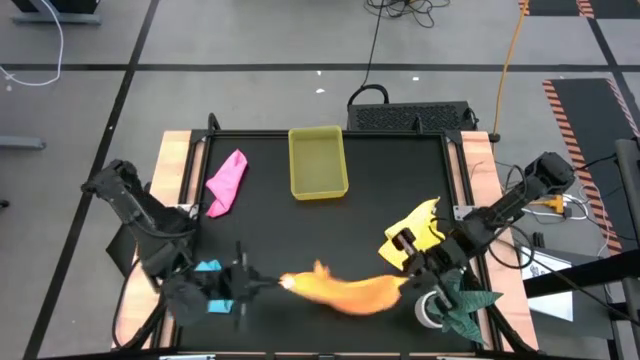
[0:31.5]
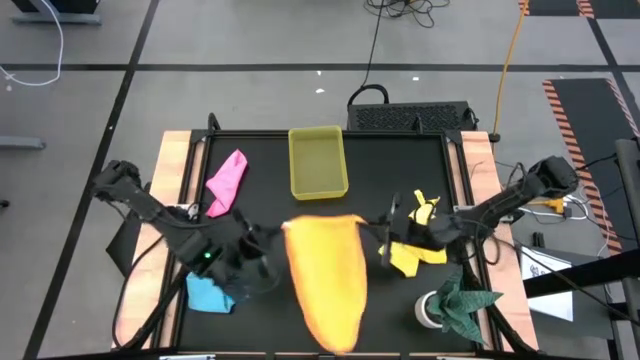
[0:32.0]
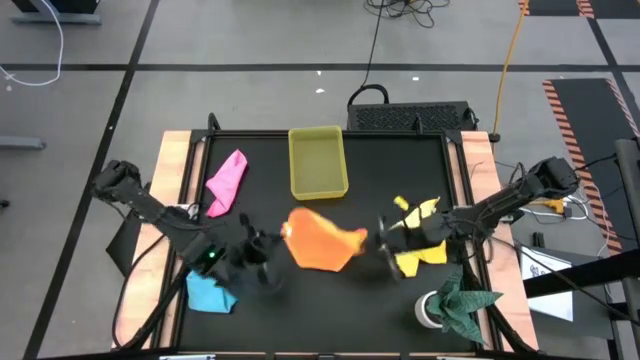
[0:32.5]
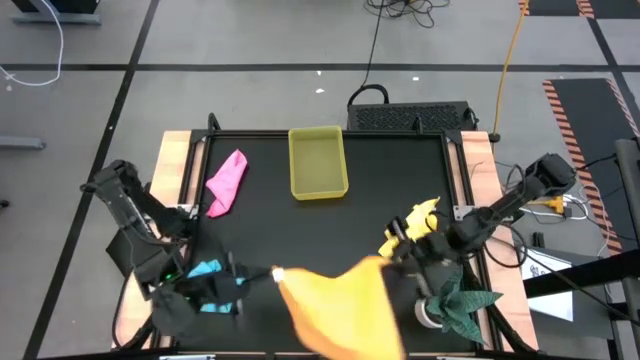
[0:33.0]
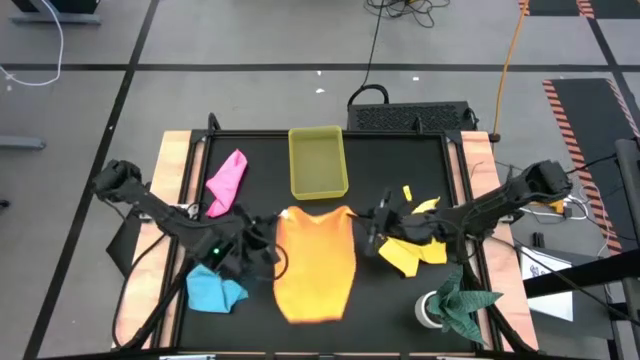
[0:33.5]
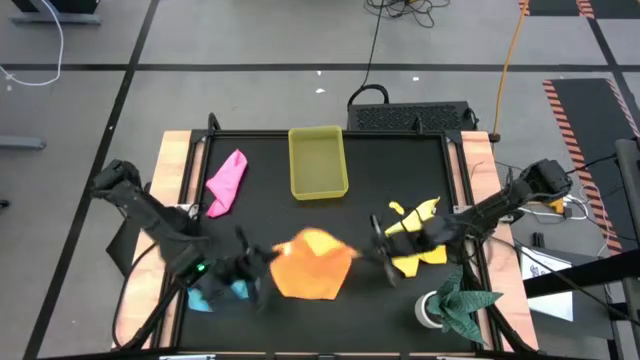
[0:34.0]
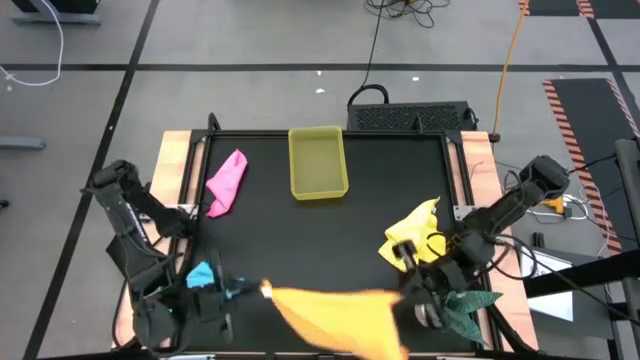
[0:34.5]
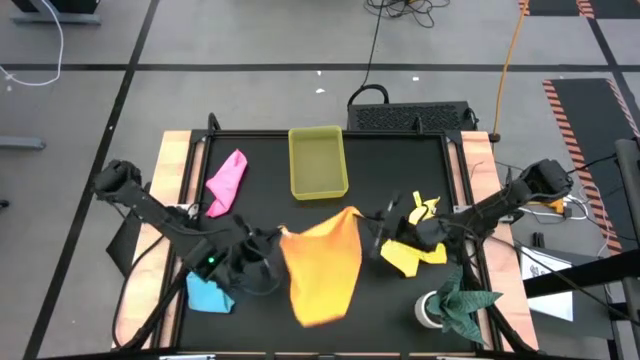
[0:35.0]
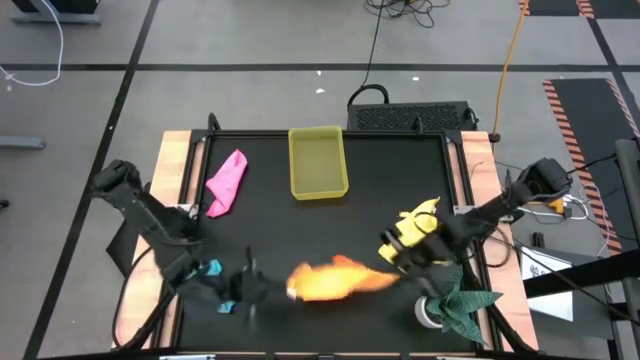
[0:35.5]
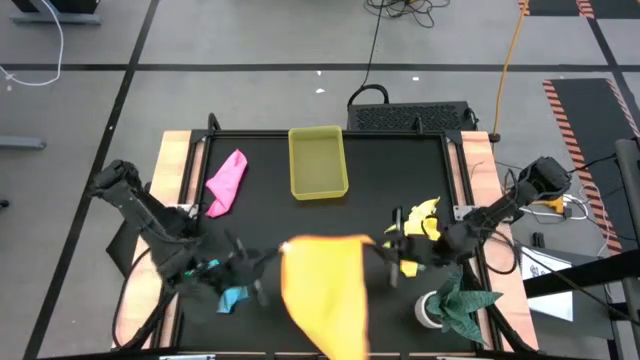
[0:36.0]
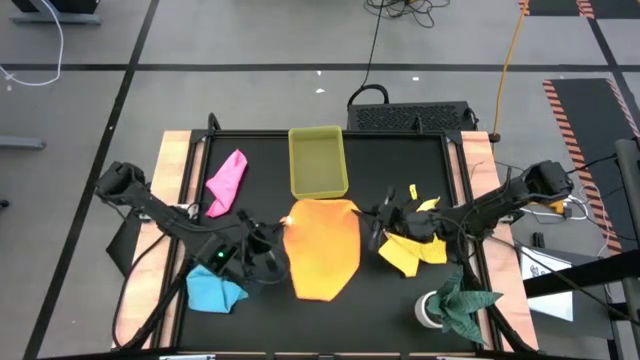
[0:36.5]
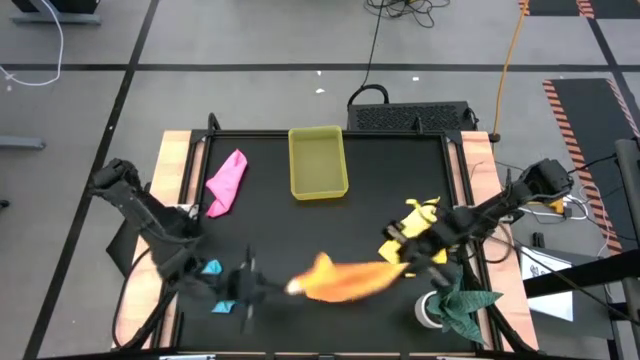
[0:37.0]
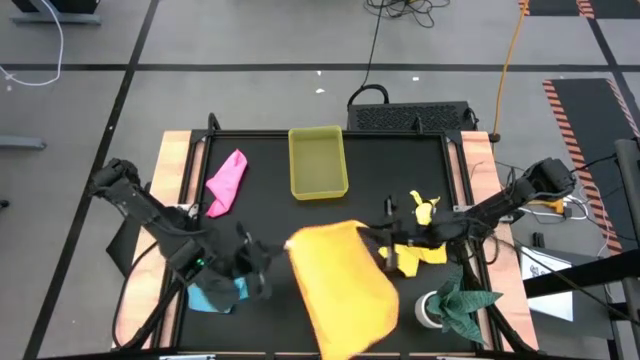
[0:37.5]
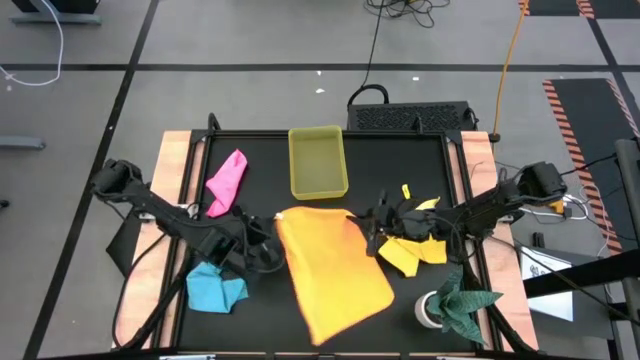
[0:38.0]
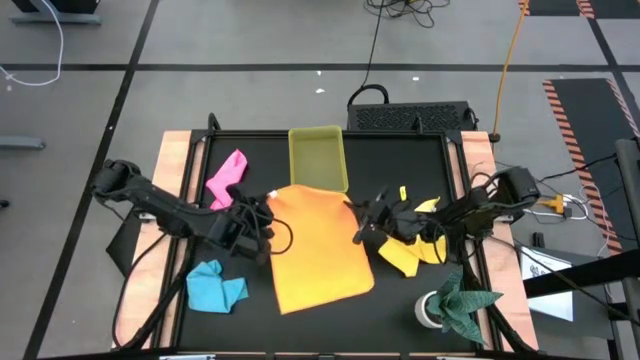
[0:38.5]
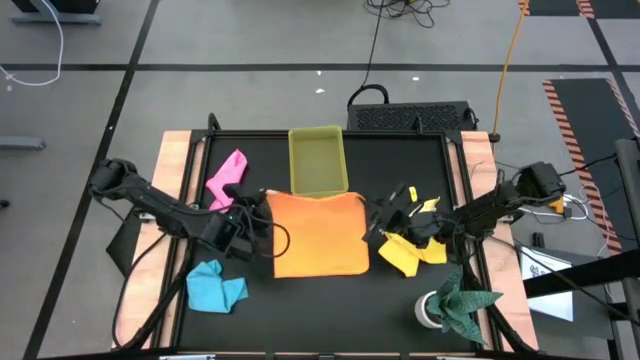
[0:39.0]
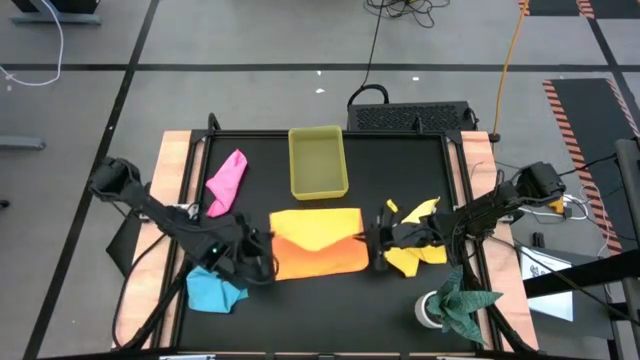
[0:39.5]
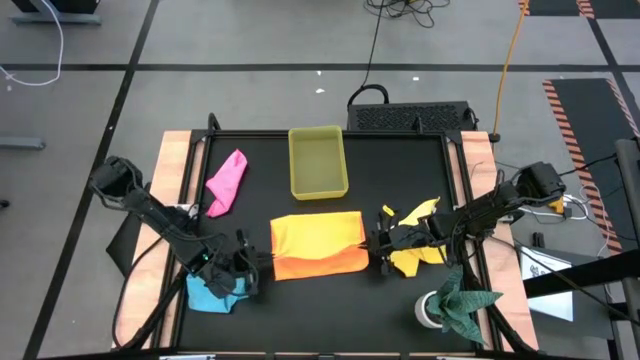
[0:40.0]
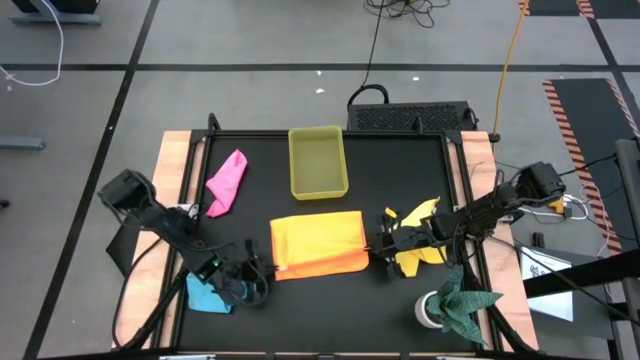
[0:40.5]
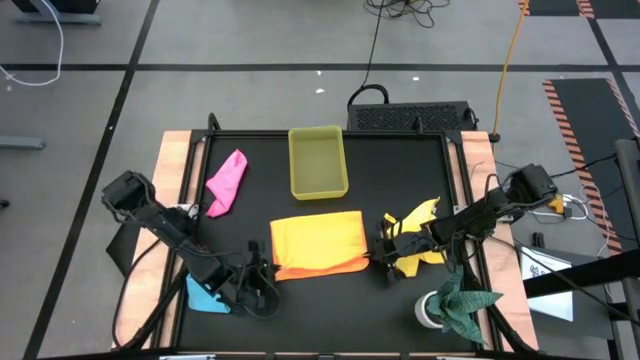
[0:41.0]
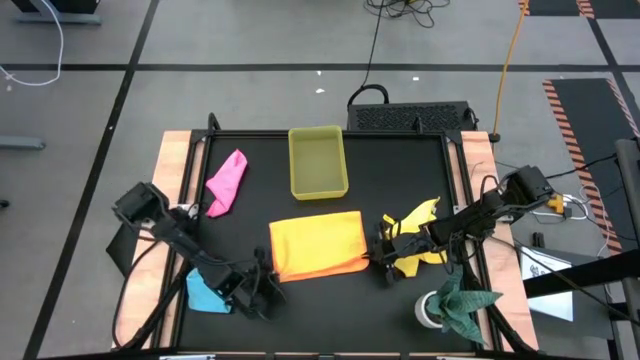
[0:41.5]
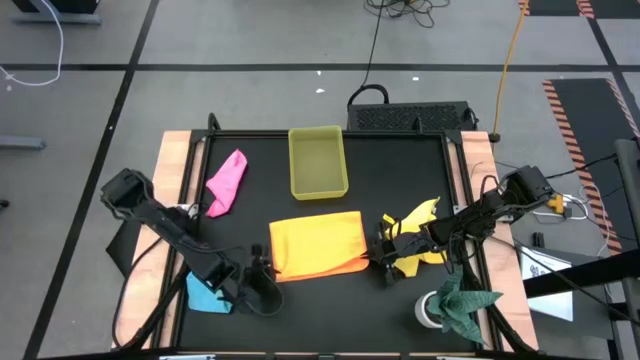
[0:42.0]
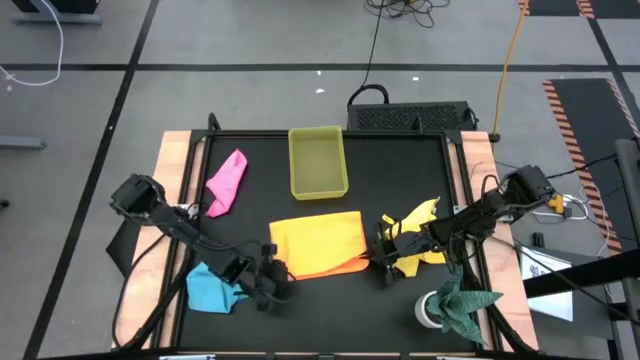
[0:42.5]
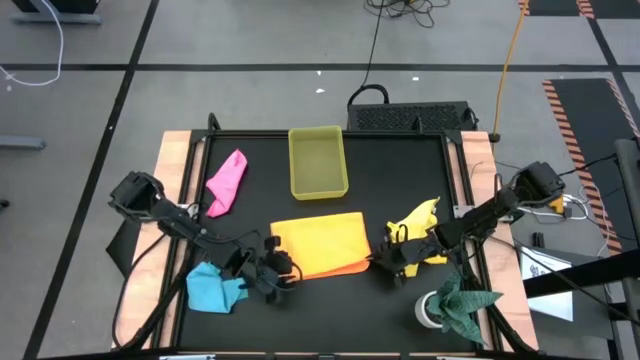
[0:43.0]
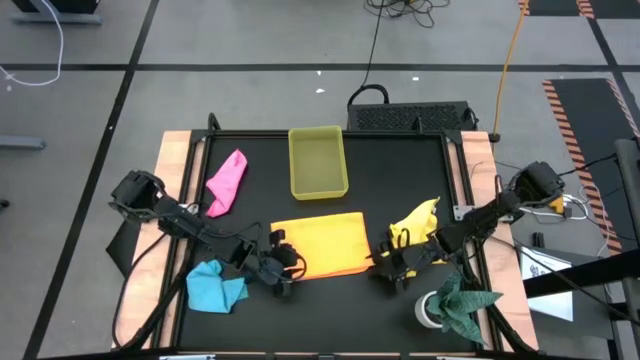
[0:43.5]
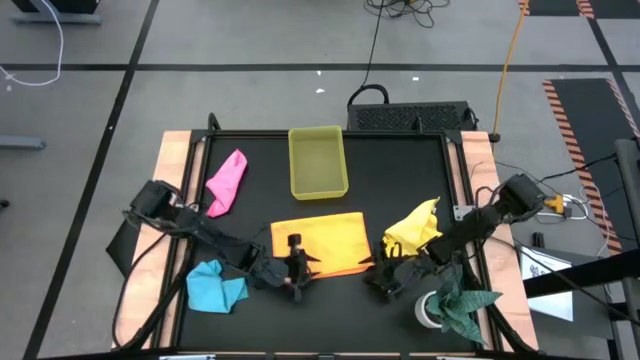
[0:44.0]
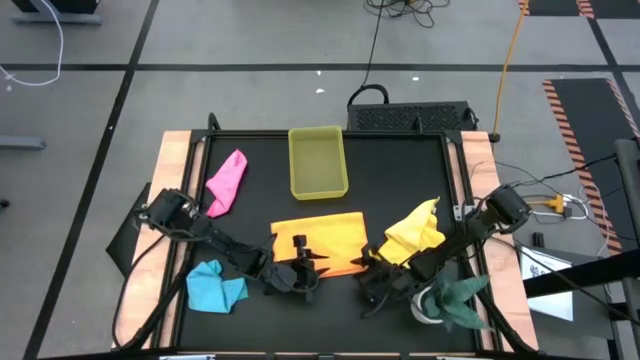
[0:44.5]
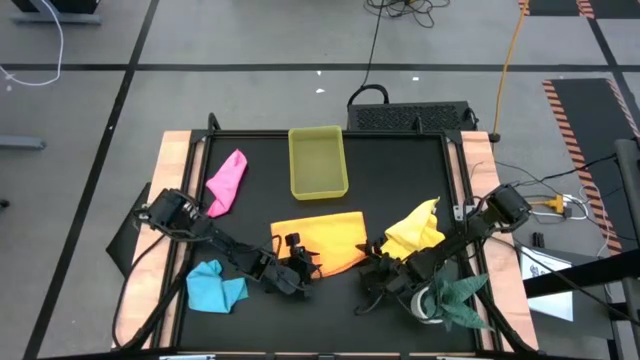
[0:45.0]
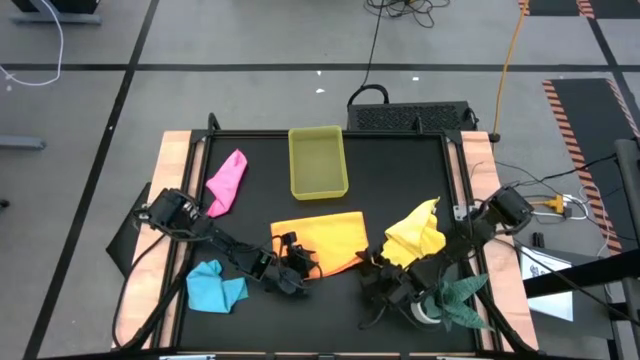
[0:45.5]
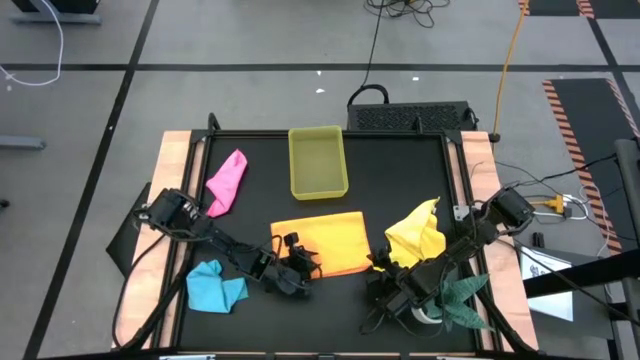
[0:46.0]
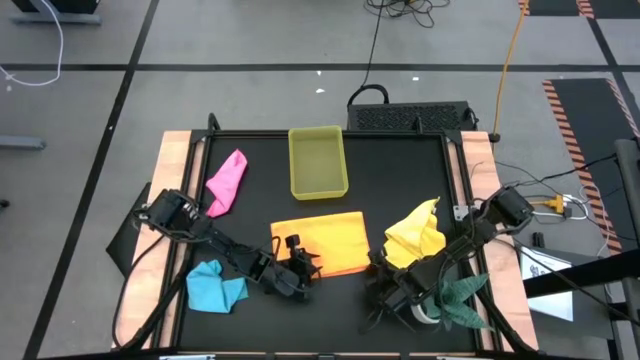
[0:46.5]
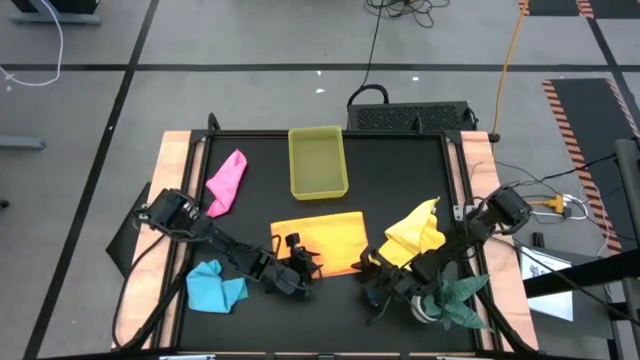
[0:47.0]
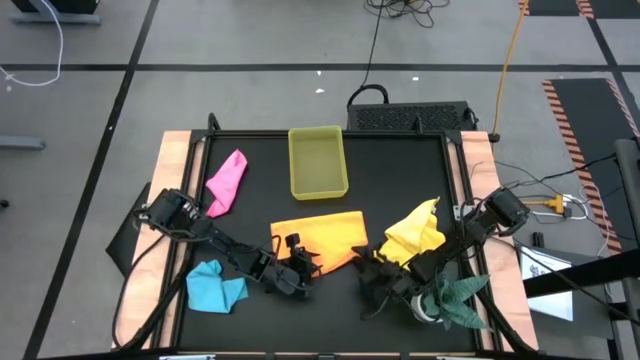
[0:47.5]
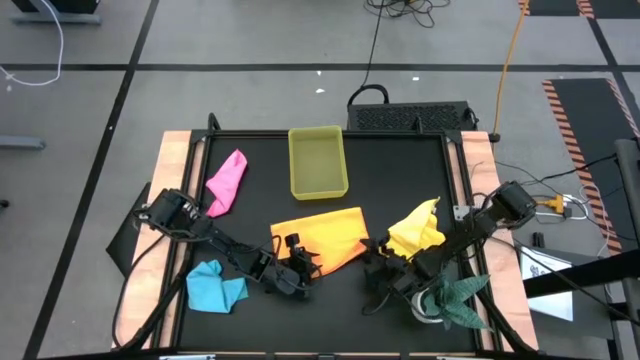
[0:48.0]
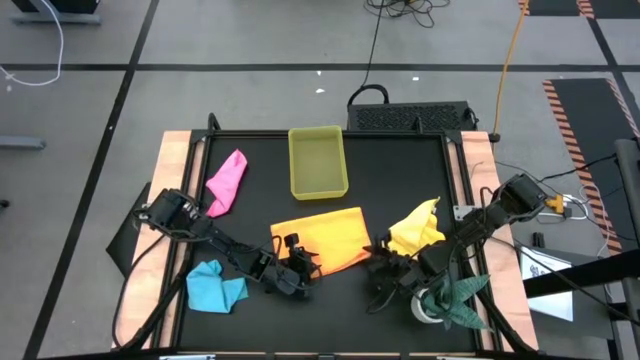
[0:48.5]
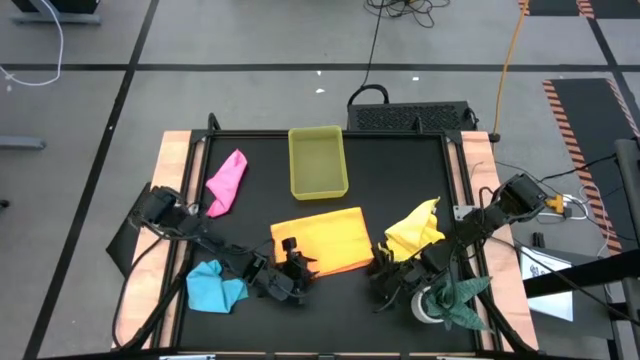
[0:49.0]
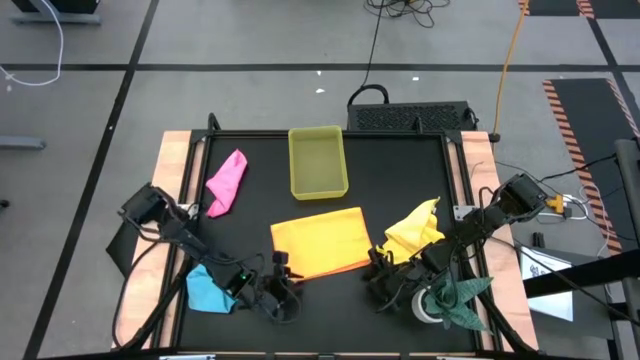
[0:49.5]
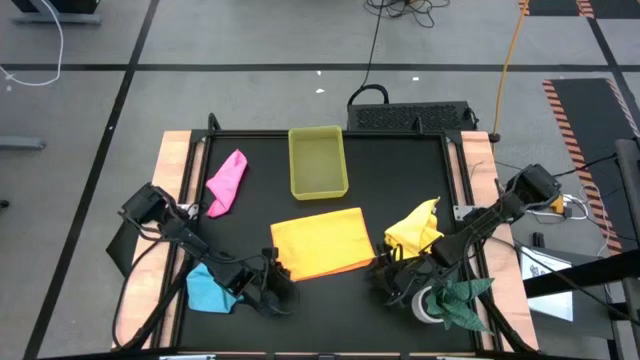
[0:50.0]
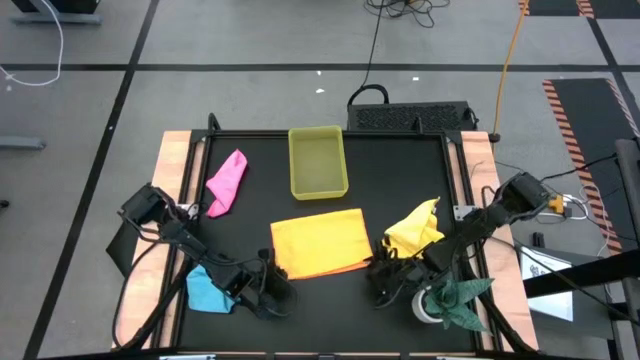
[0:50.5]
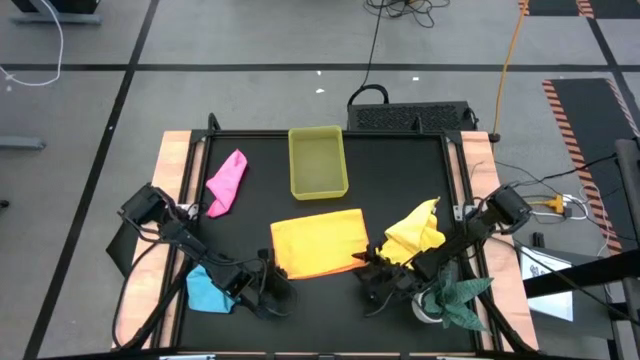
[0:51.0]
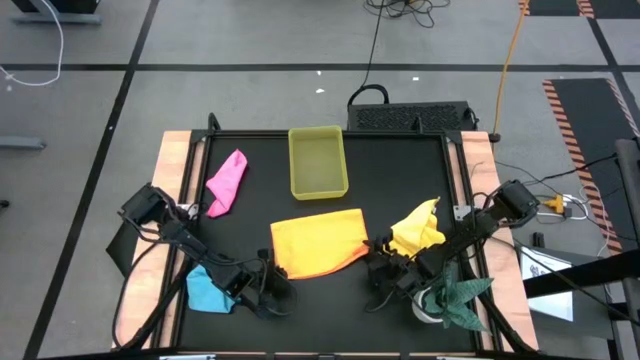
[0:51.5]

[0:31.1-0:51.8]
Task: Fold microfiber towels
Fold the orange towel
